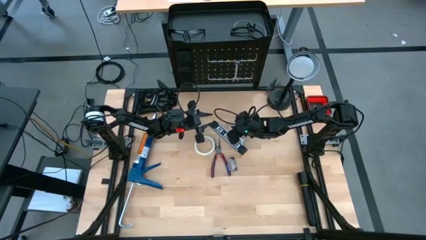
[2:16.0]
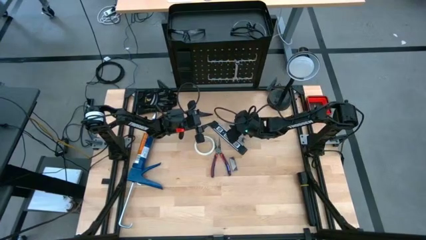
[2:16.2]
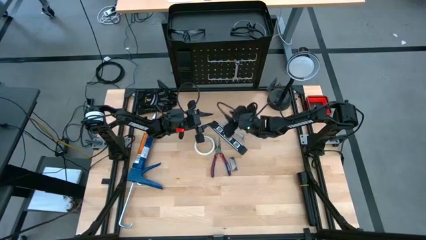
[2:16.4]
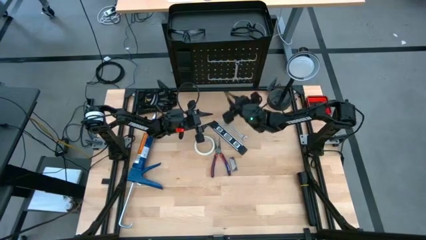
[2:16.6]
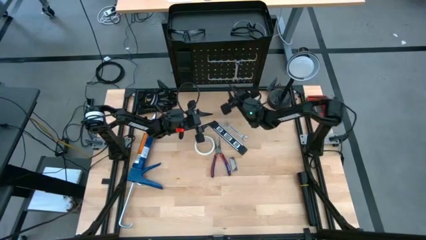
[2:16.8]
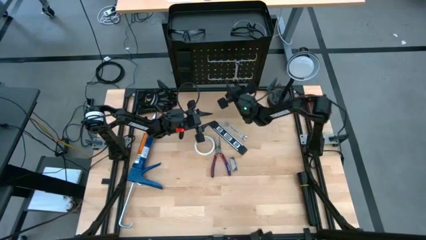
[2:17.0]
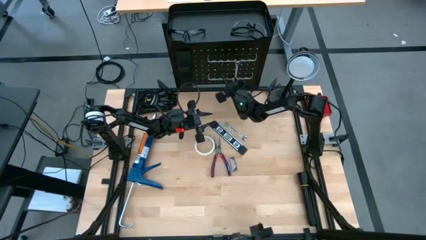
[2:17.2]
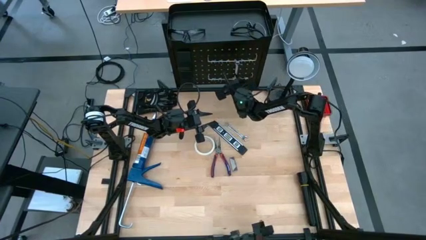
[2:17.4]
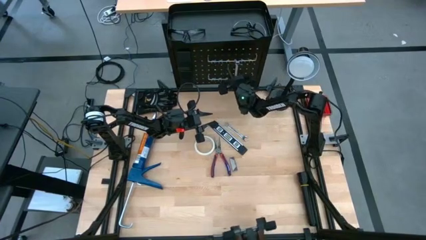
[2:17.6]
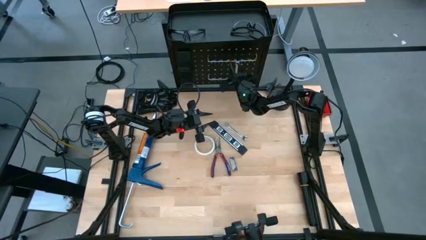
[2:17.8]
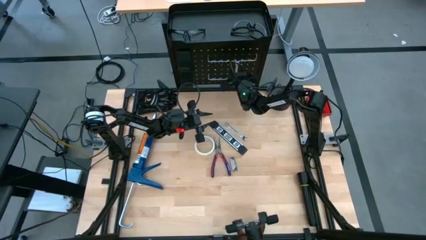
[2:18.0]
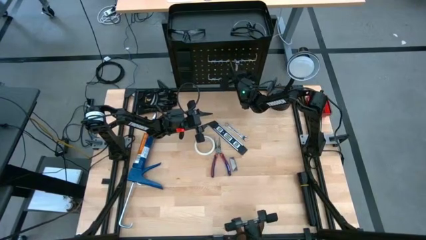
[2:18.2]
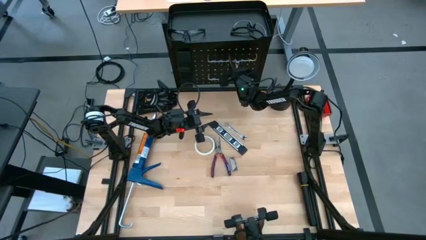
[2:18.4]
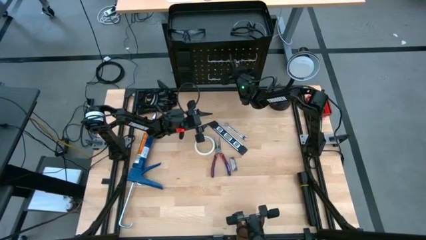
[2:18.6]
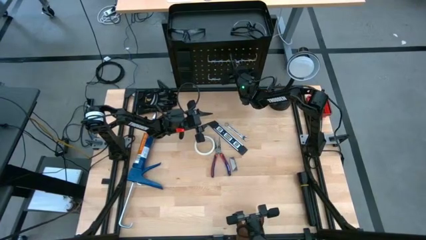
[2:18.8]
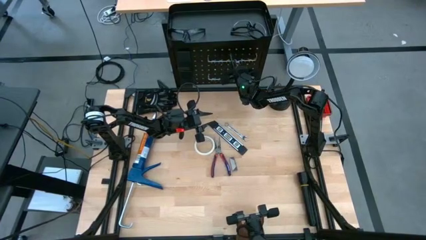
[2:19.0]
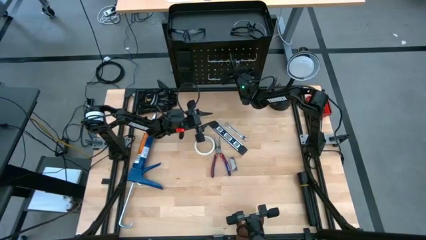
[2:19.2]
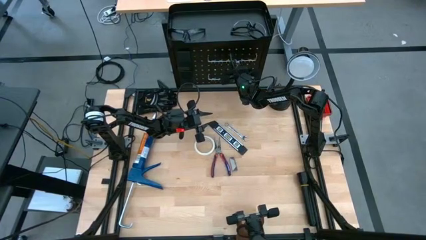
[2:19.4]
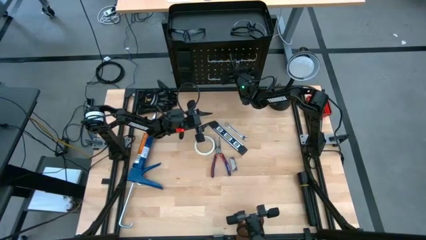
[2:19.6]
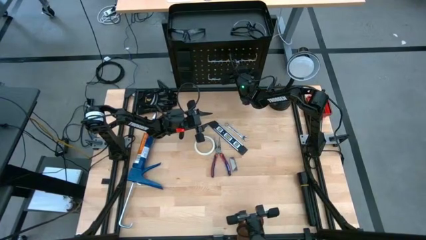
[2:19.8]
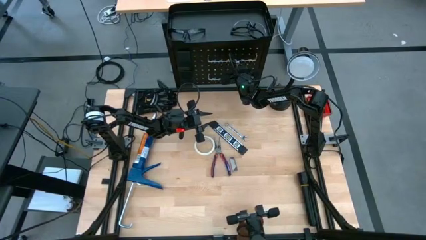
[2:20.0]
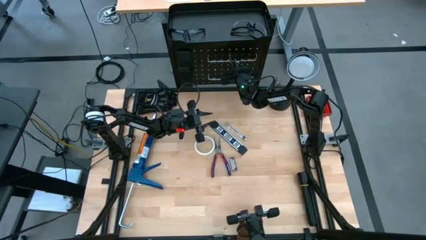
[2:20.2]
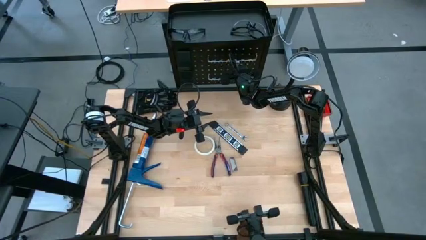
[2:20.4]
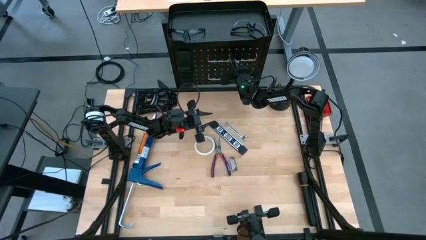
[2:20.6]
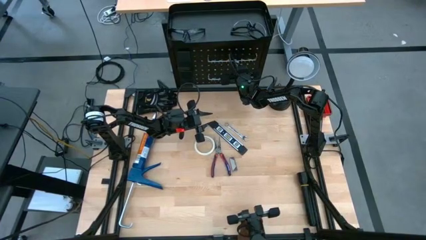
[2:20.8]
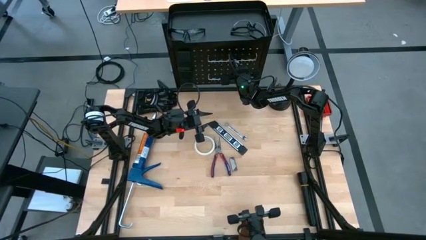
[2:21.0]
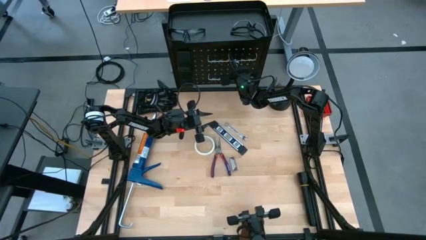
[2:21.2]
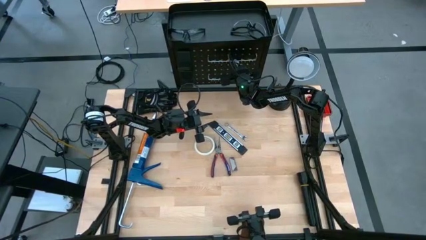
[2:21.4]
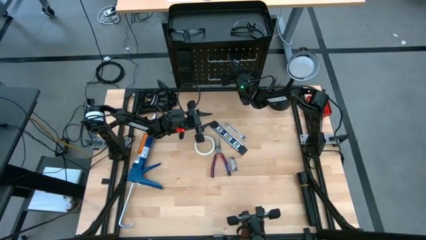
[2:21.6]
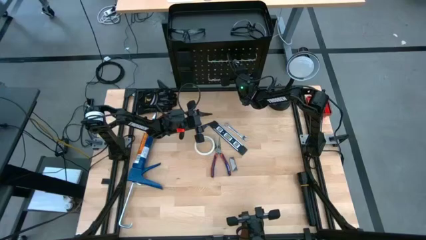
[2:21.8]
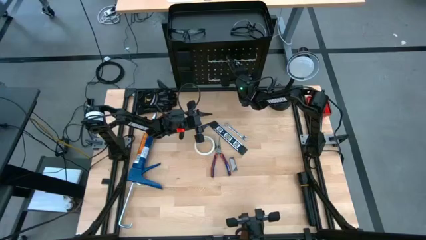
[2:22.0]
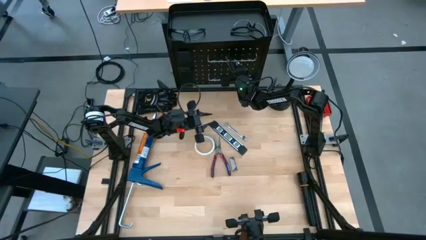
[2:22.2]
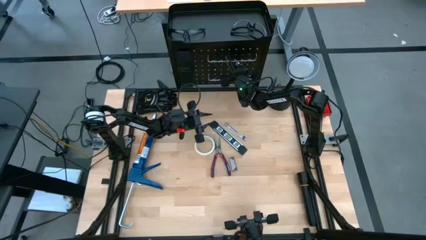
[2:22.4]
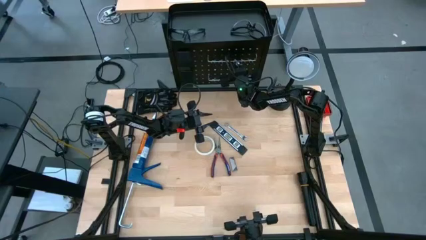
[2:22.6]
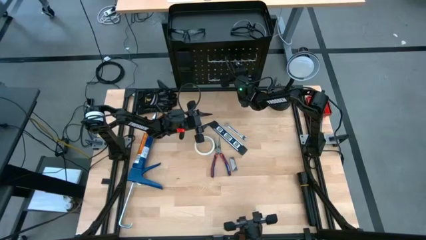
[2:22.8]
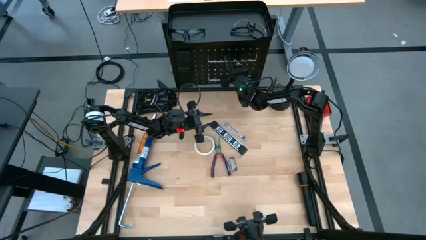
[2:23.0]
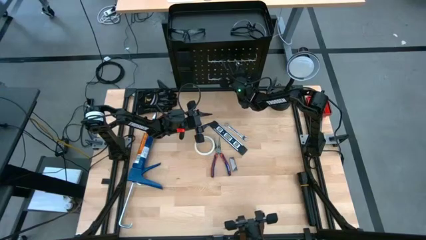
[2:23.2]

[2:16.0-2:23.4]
Task: Hang tools onto peg board
Unhang the silver wrench from the black peg board

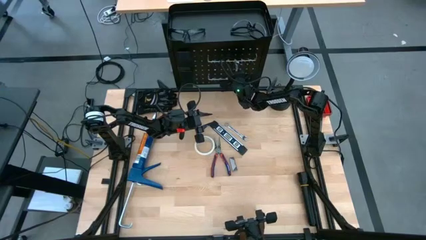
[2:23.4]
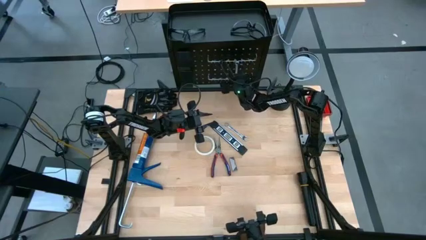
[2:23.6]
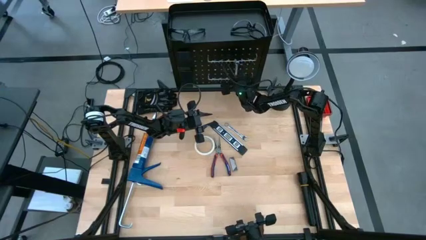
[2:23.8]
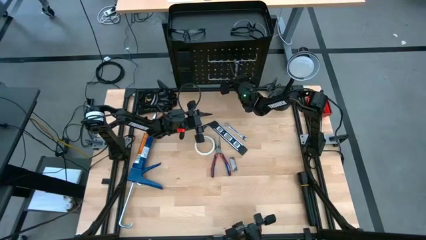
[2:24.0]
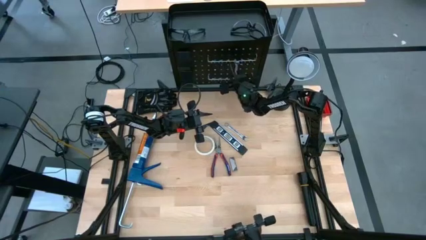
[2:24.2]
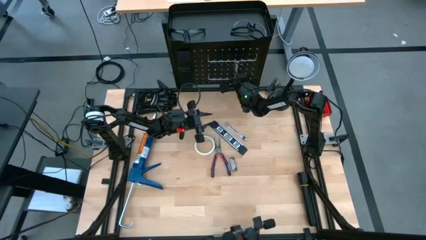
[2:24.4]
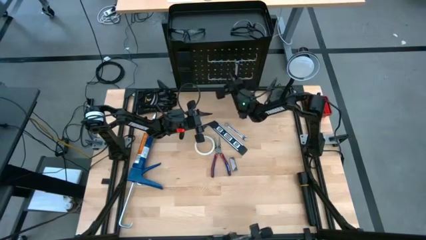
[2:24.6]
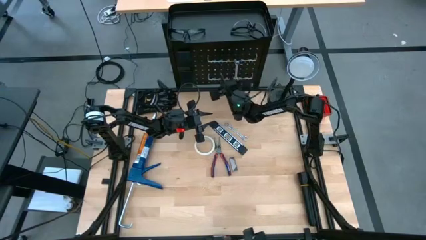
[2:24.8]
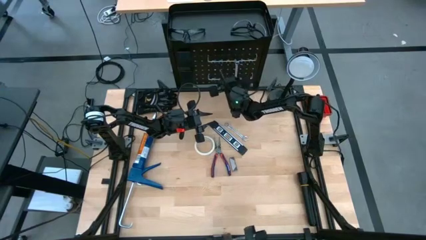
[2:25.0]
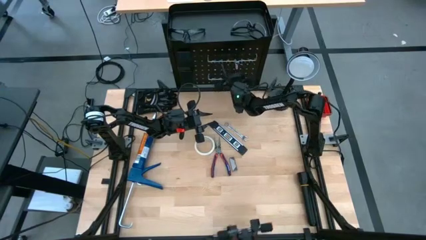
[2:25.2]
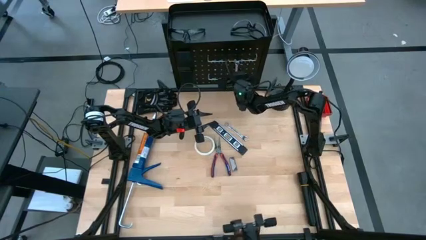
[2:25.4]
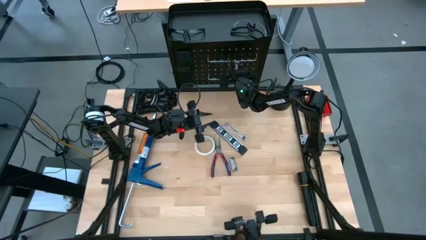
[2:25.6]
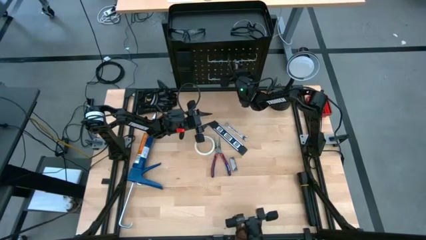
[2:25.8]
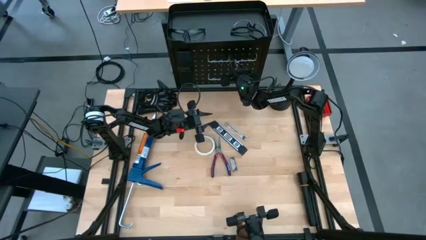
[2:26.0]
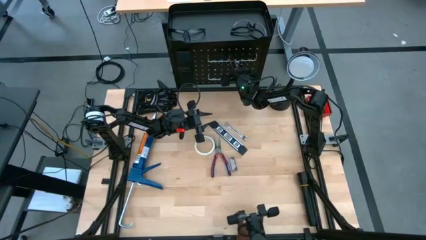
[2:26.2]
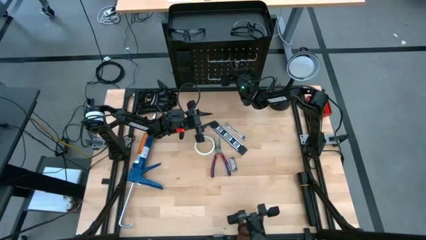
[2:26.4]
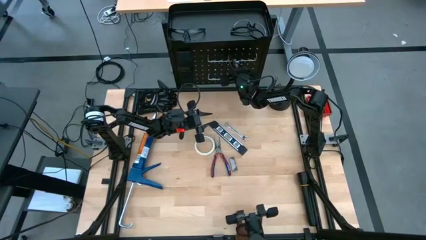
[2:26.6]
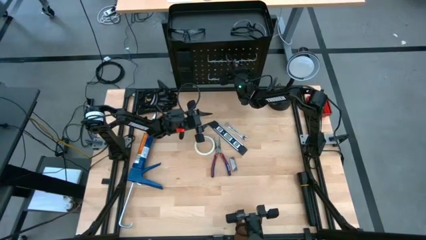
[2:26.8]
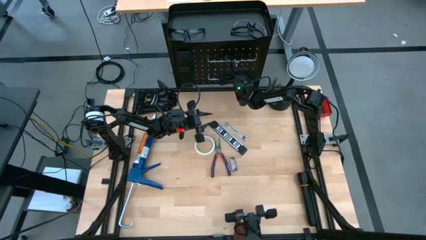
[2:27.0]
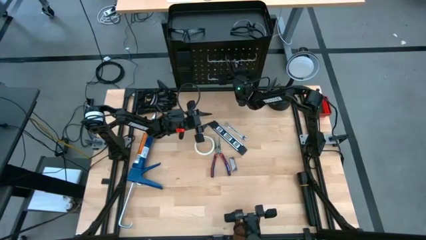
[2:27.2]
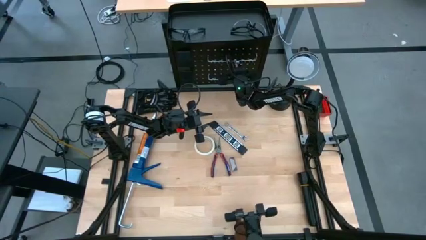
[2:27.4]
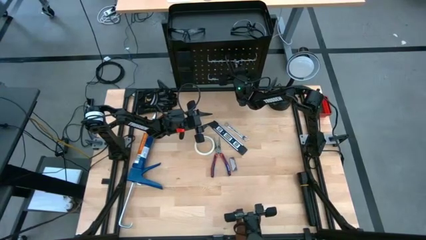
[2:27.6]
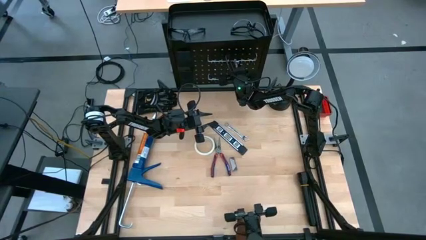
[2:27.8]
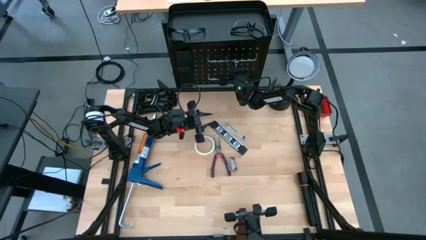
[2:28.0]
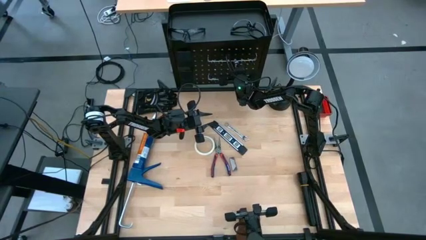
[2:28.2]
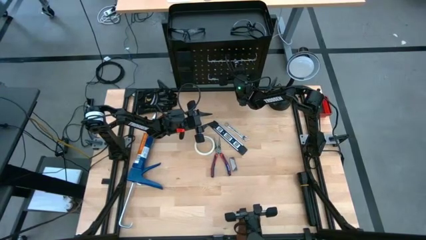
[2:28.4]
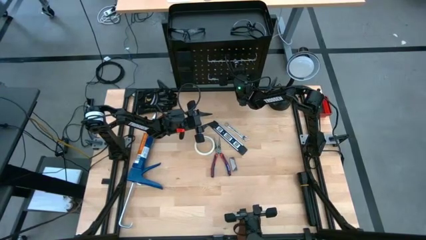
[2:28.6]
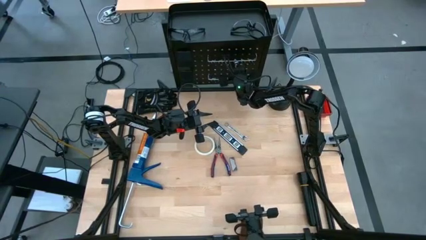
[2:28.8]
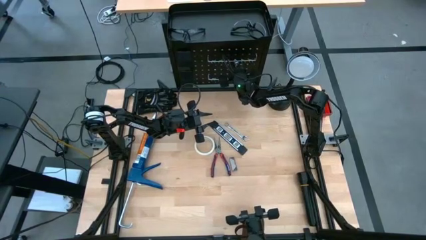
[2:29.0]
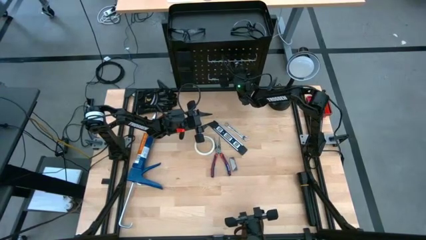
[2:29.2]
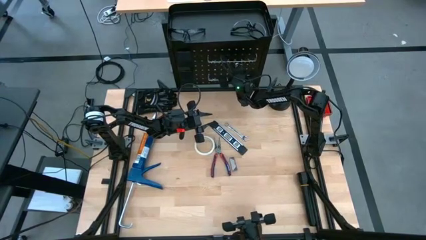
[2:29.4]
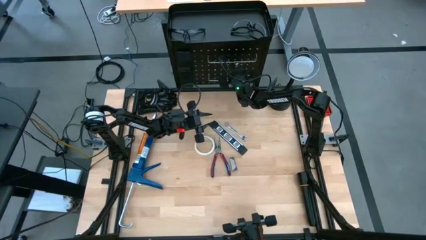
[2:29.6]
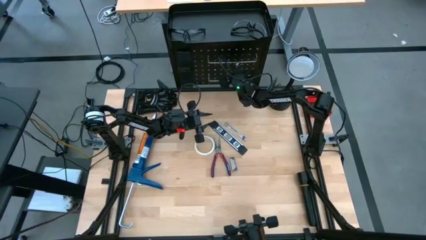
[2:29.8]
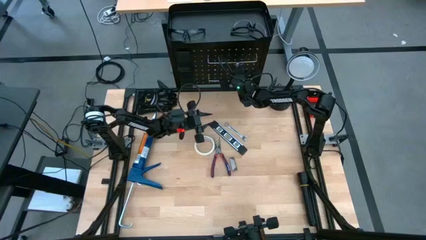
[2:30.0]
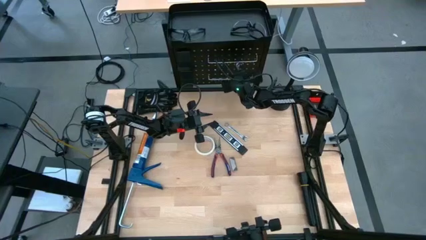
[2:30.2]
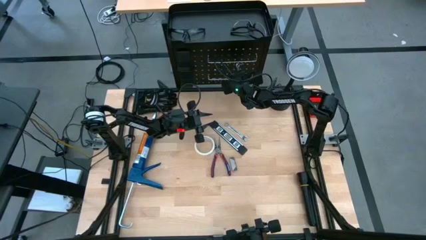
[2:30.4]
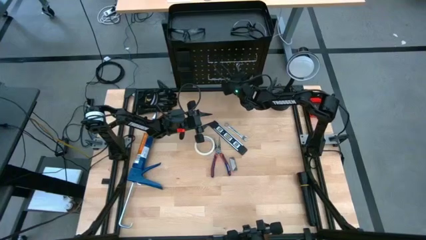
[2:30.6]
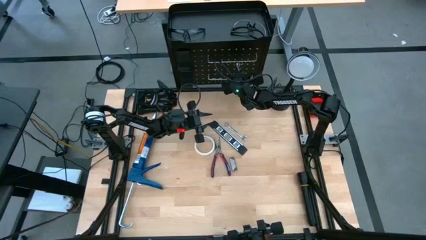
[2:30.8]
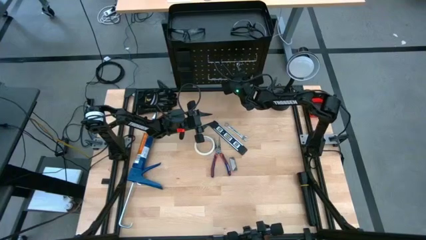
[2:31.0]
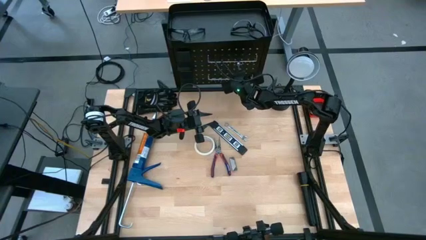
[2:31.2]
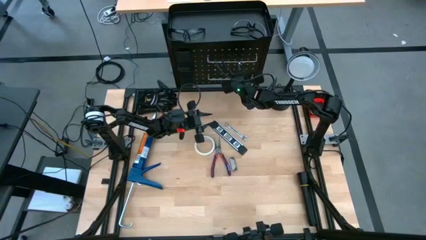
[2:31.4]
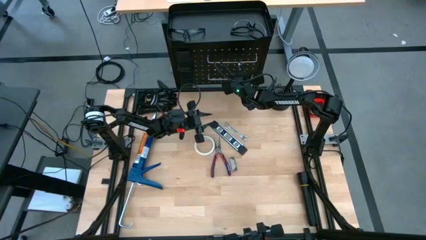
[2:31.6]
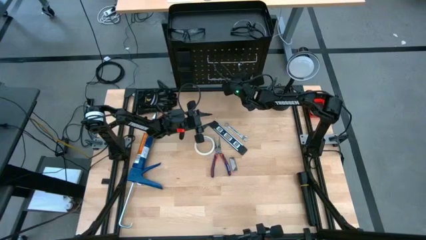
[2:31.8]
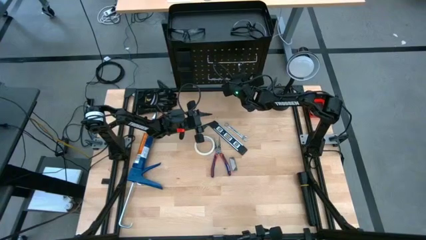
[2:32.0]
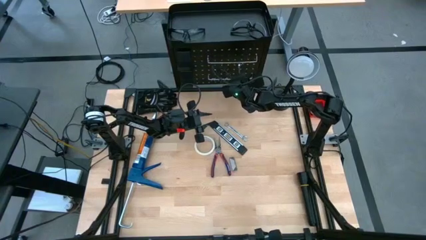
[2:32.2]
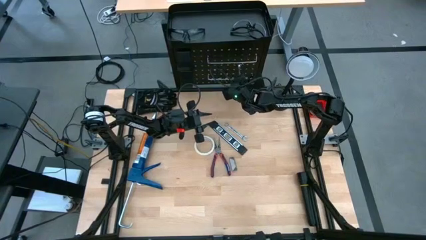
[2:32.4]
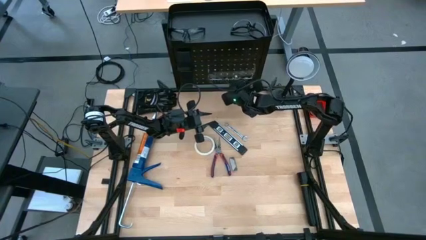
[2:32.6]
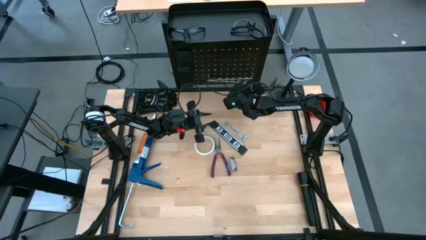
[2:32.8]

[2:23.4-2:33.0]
Unhang the silver wrench from the black peg board
